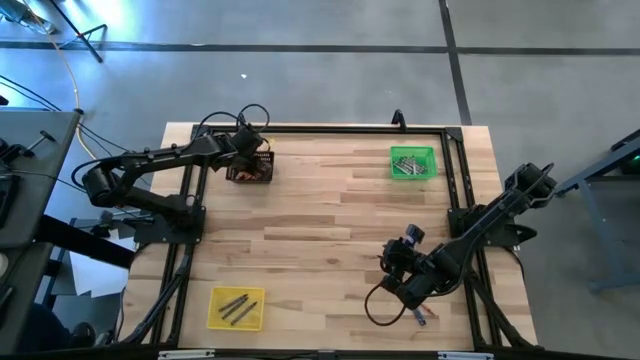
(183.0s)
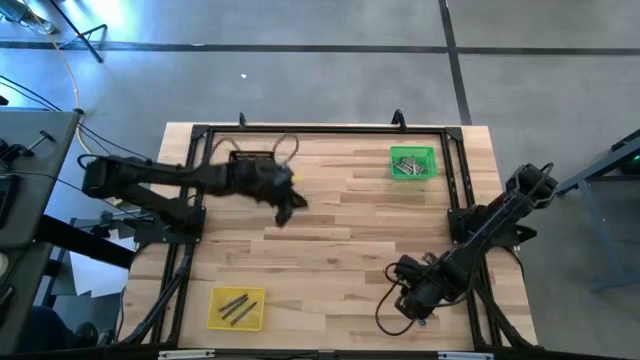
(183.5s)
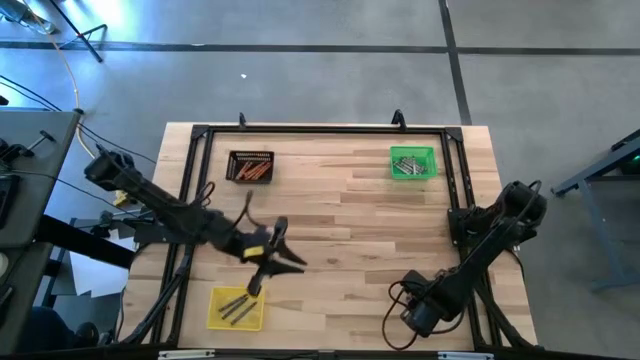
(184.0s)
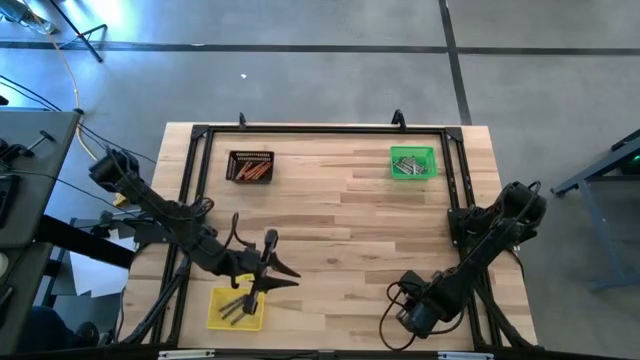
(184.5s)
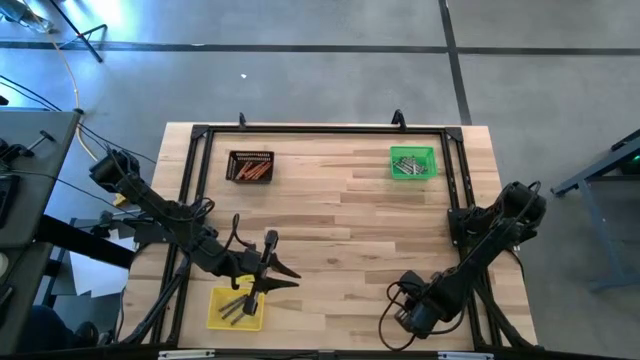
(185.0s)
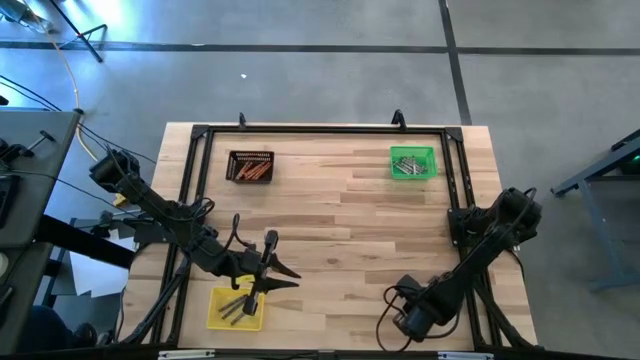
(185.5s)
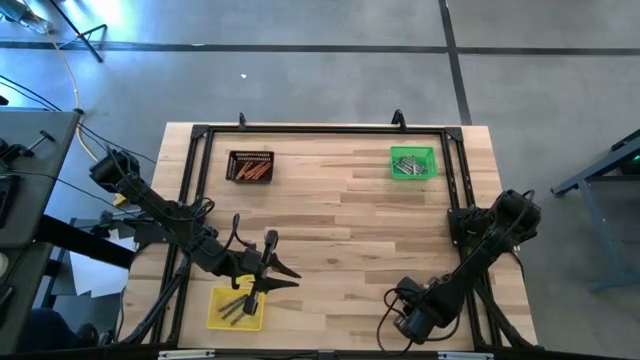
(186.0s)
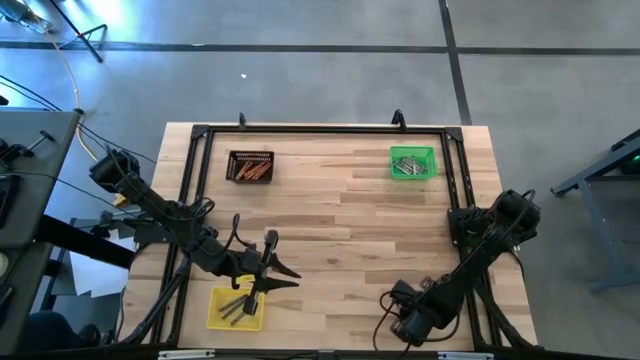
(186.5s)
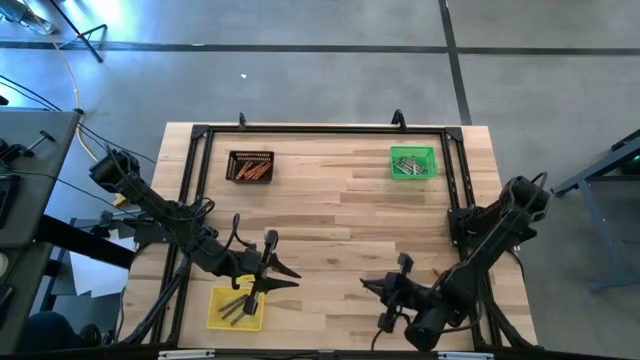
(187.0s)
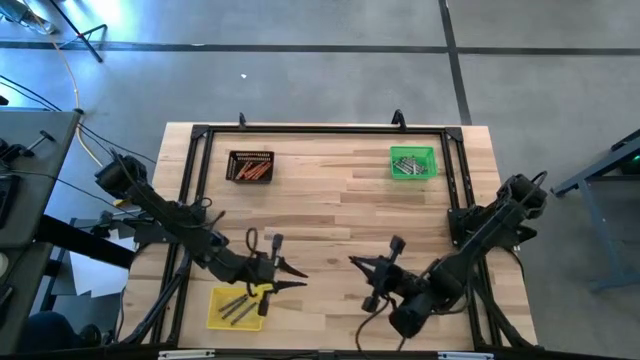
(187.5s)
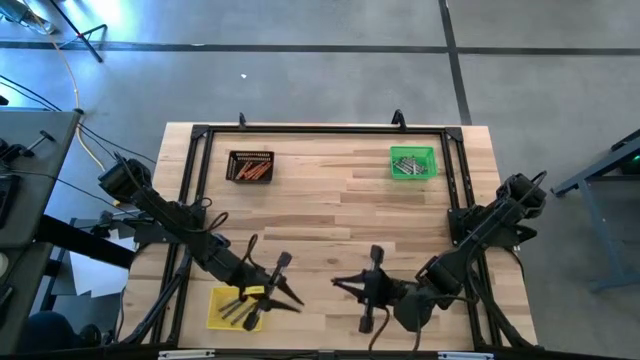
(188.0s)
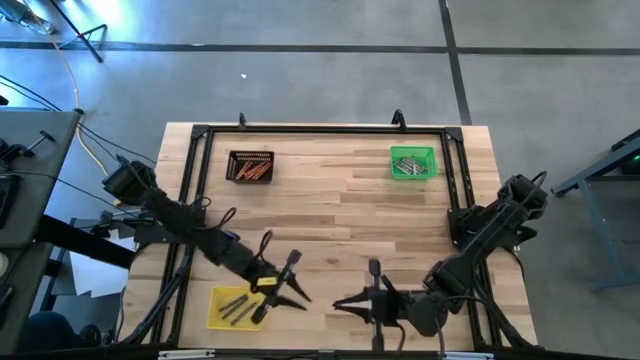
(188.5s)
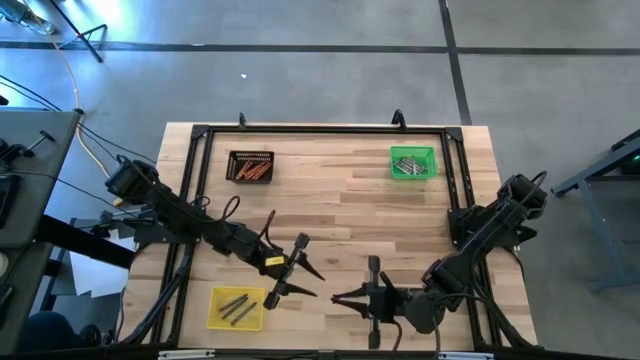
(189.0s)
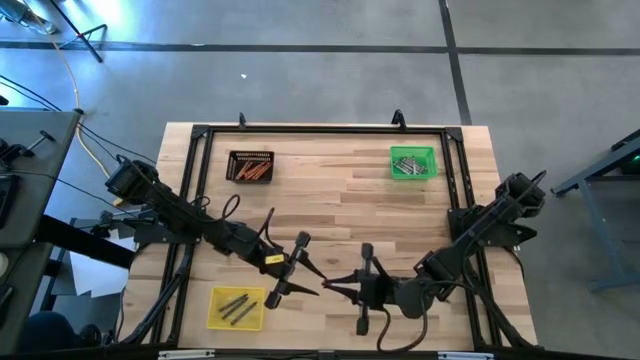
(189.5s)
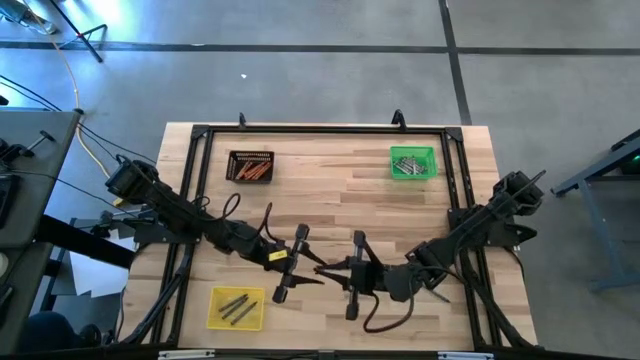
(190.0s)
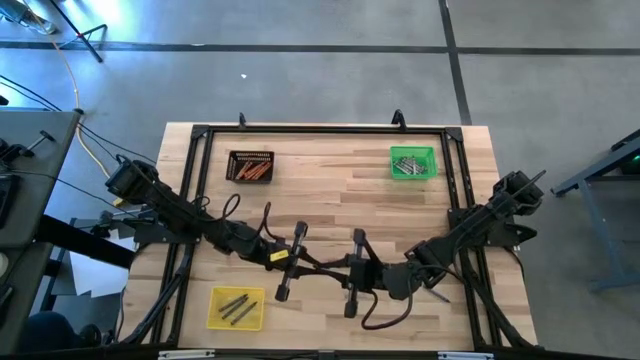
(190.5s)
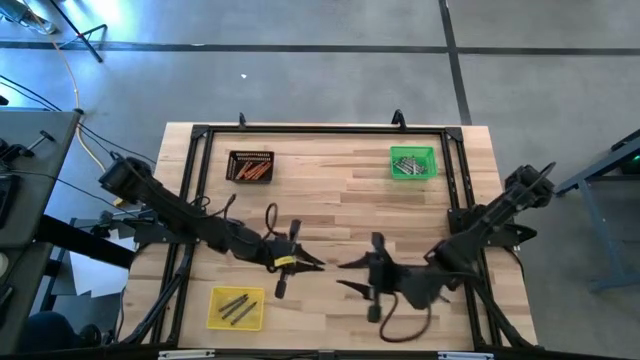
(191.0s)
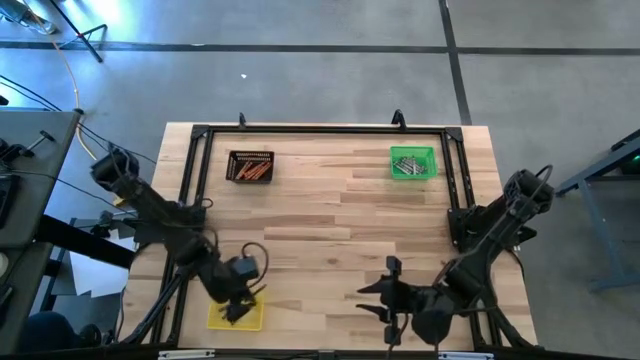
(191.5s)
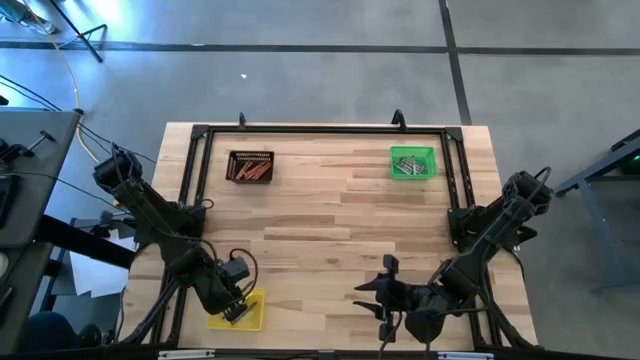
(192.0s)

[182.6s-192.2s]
Task: Sort crayons
Put the blue crayon into the yellow bin

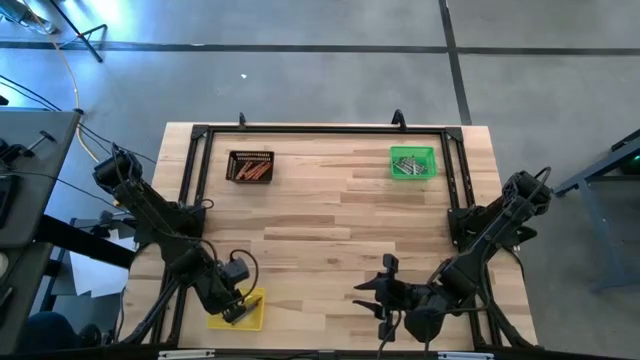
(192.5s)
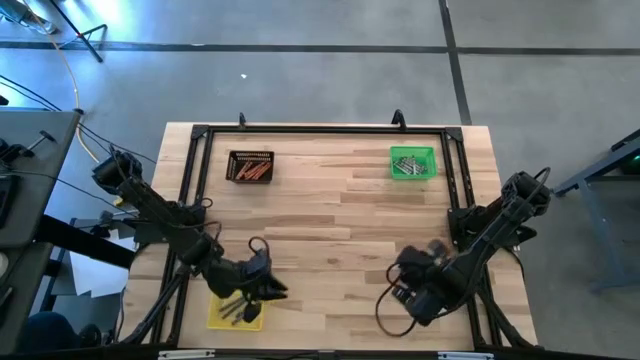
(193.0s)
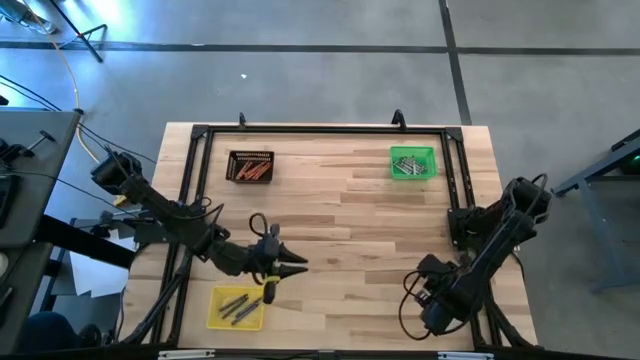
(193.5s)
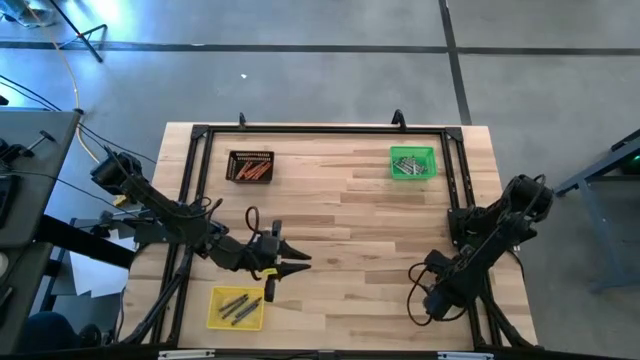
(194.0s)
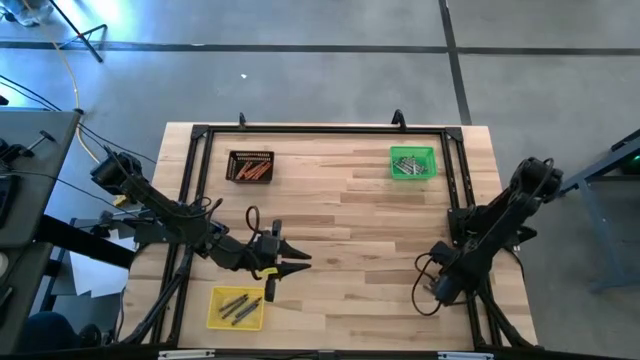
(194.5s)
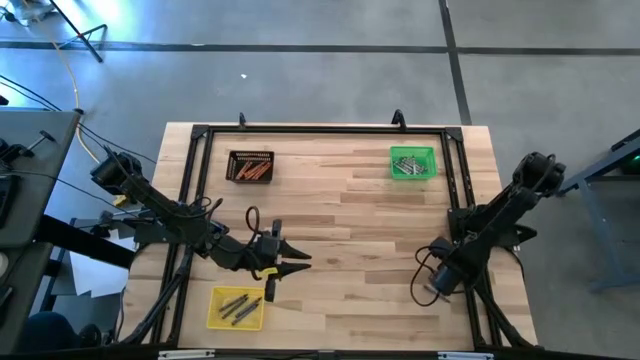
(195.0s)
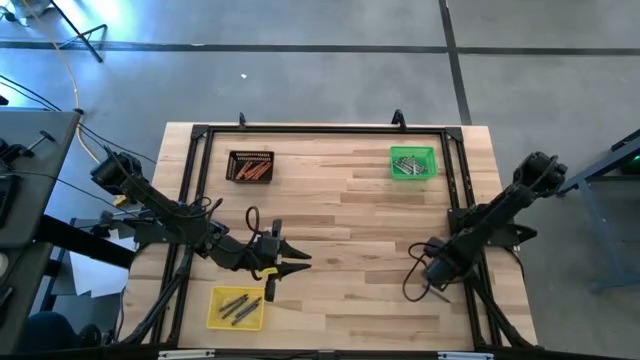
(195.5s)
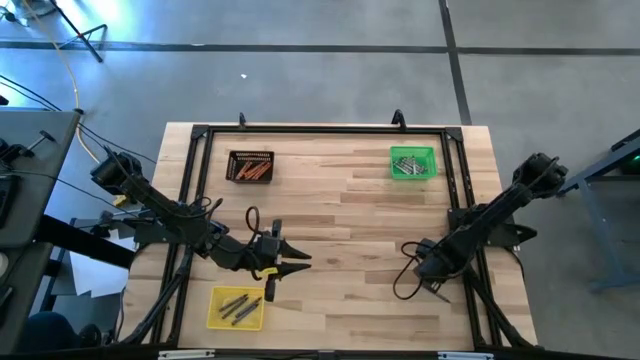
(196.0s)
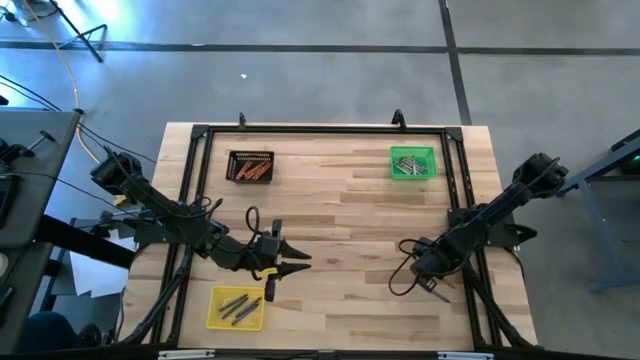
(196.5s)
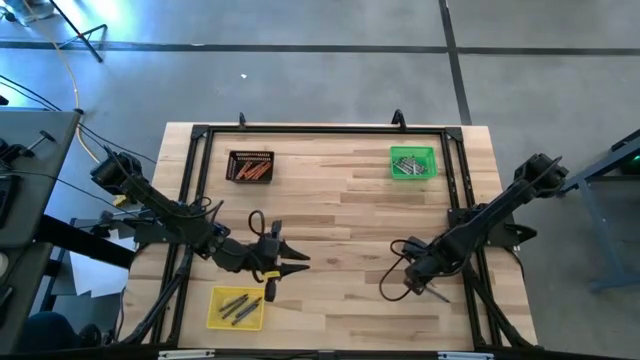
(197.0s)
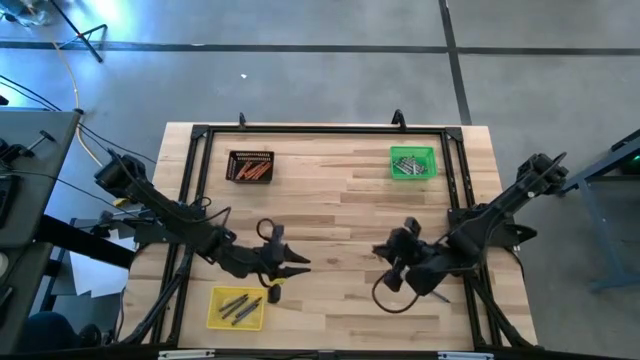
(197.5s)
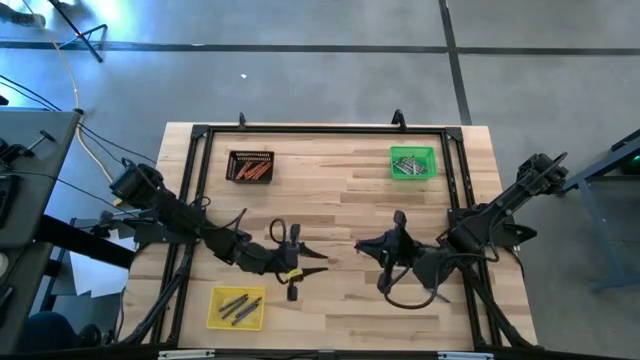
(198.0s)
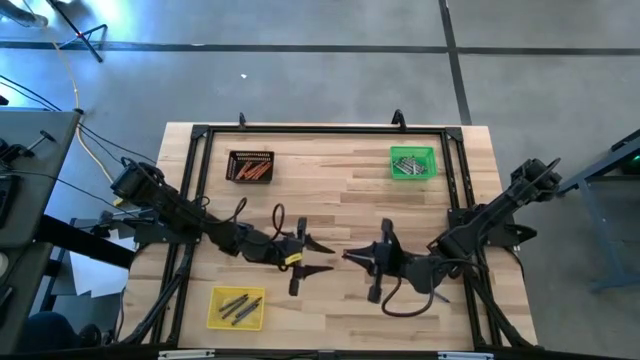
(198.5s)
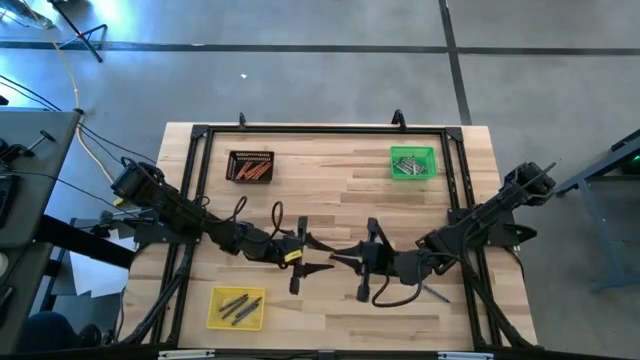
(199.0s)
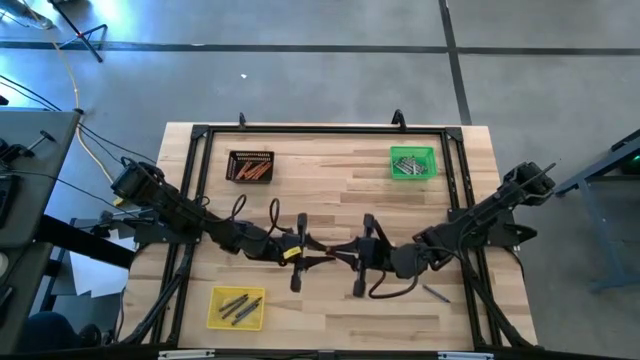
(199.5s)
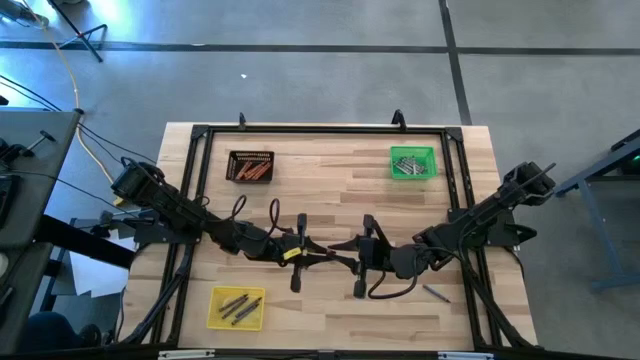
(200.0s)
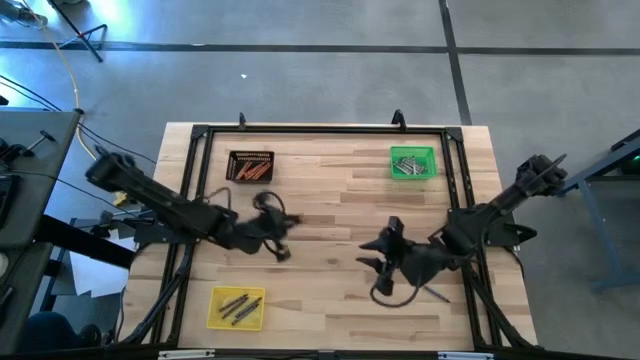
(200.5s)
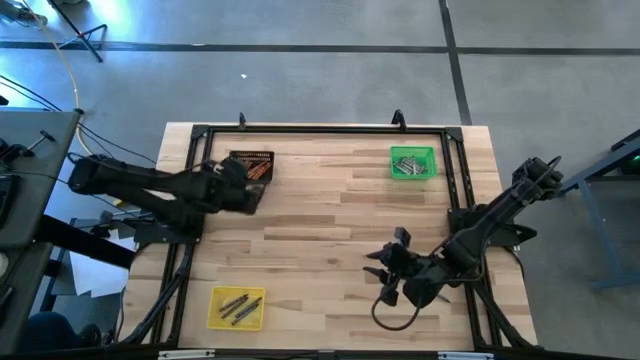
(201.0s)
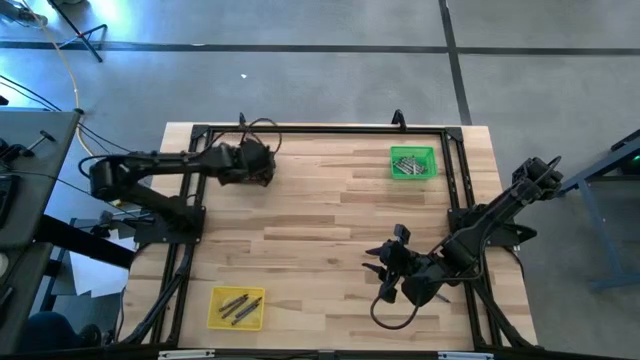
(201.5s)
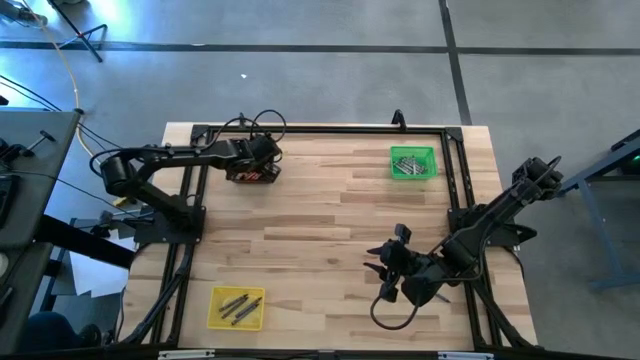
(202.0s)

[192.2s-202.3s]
Put the orange crayon into the black bin

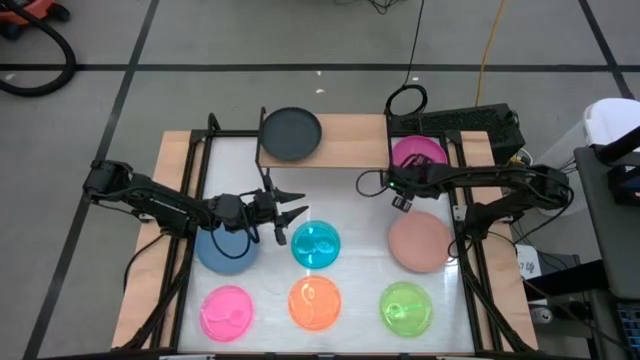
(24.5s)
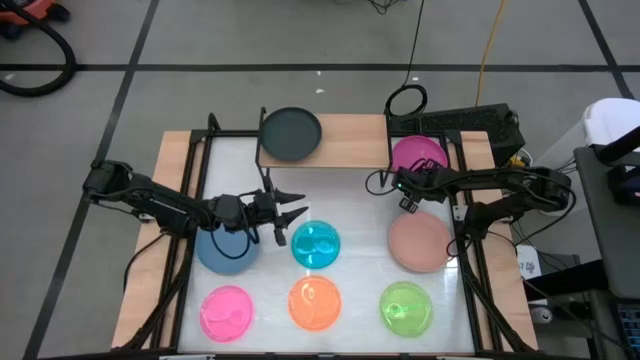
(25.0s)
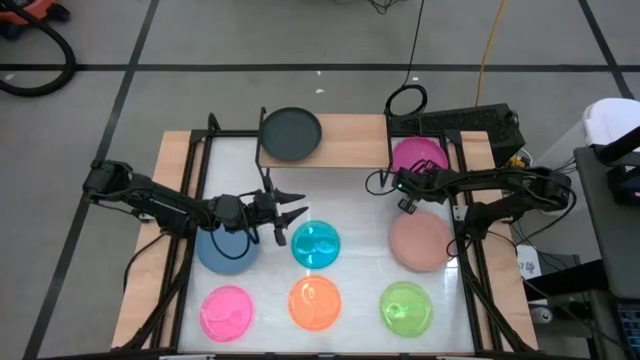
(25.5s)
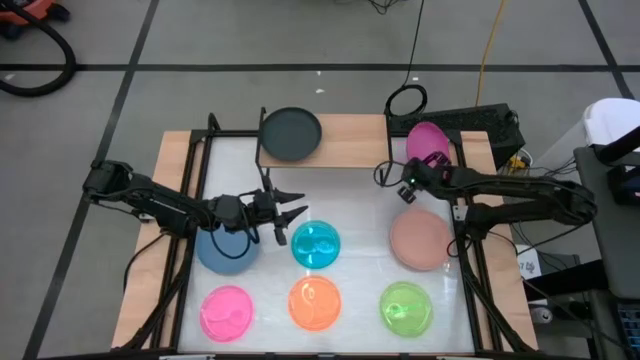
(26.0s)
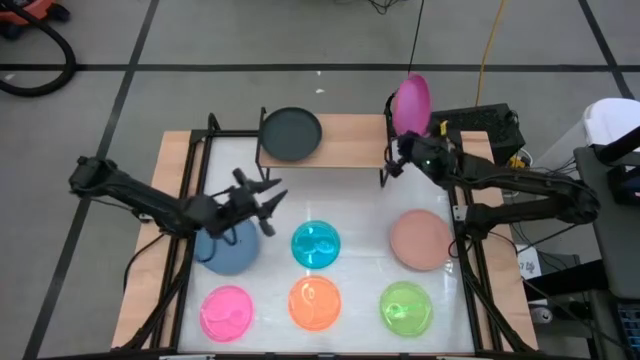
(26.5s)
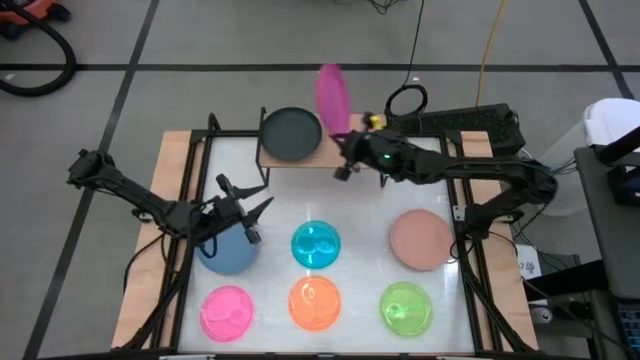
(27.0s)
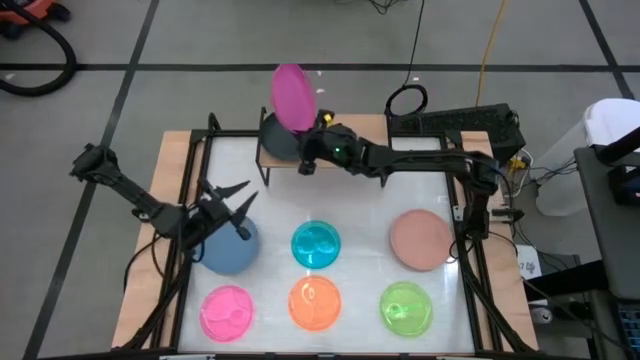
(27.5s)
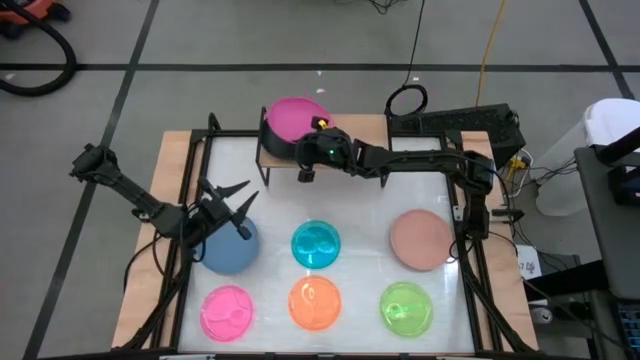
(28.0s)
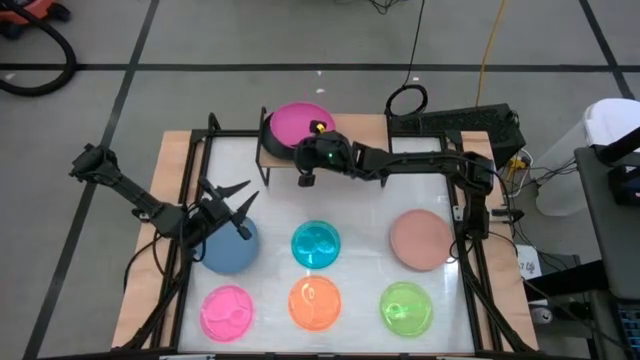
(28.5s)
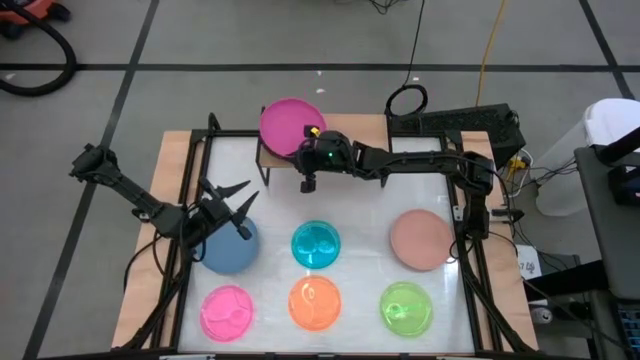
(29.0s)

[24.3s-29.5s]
Task: Place and stack plates onto a shelf
Stack the pink plate on top of the black plate on the shelf
